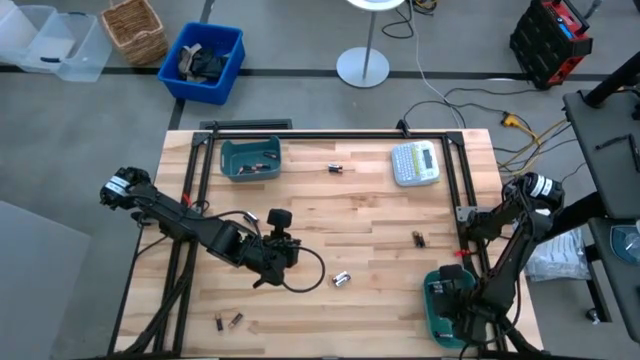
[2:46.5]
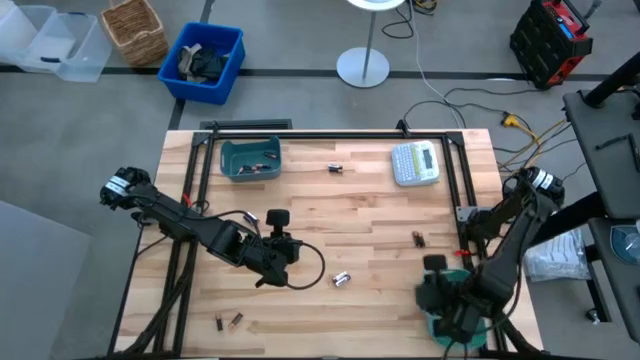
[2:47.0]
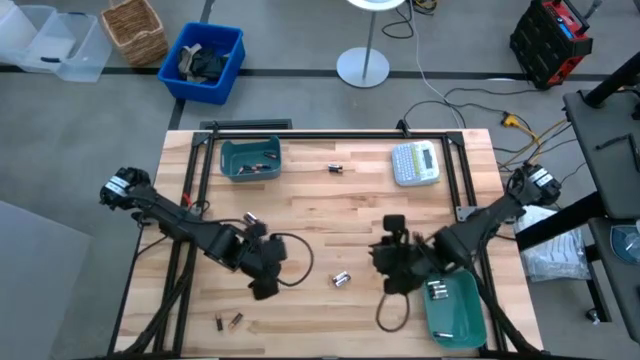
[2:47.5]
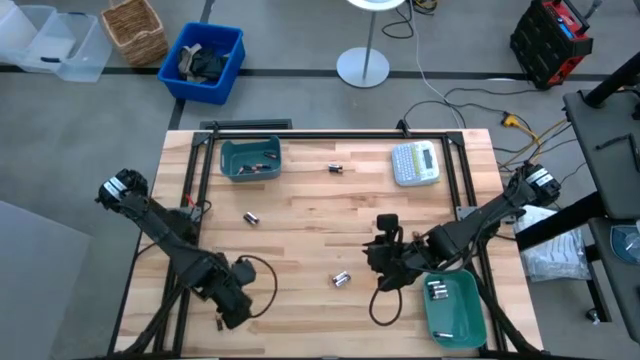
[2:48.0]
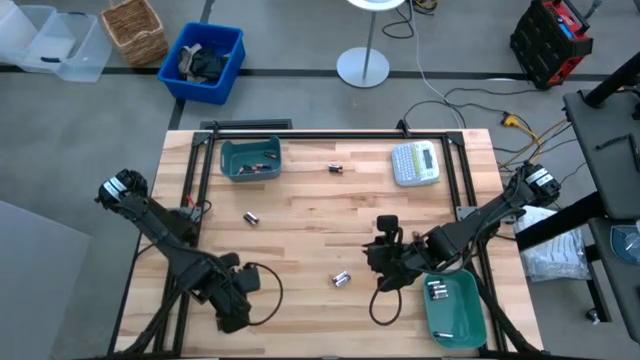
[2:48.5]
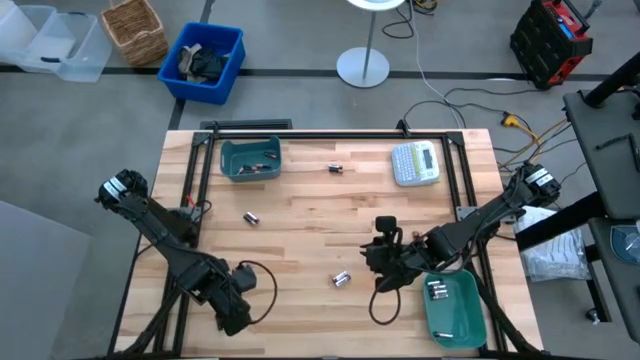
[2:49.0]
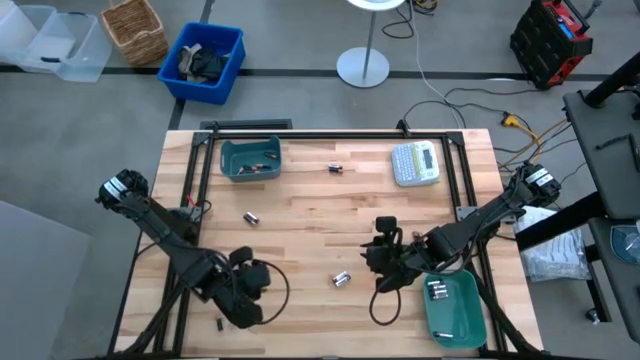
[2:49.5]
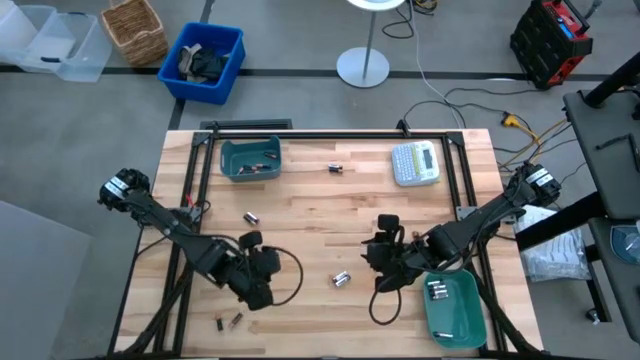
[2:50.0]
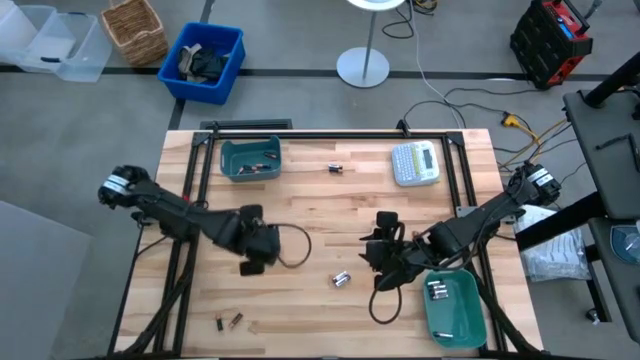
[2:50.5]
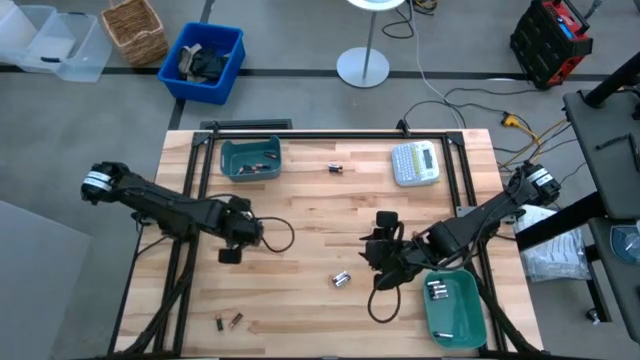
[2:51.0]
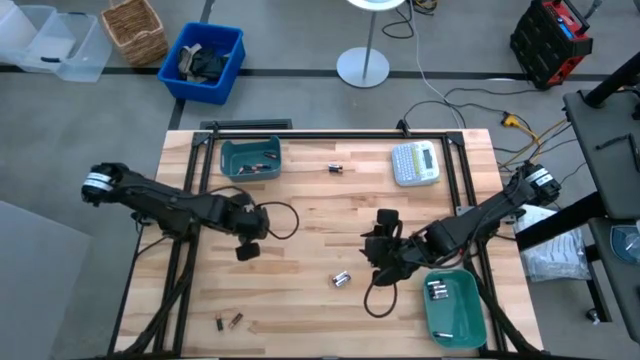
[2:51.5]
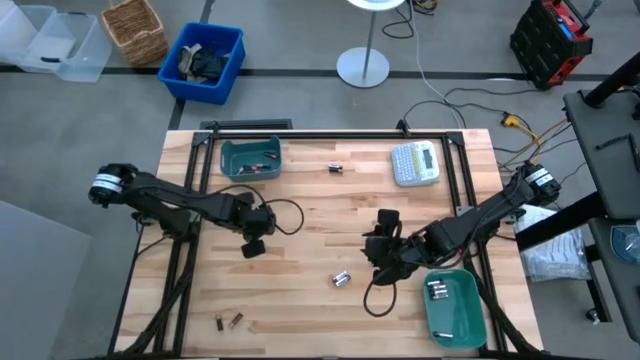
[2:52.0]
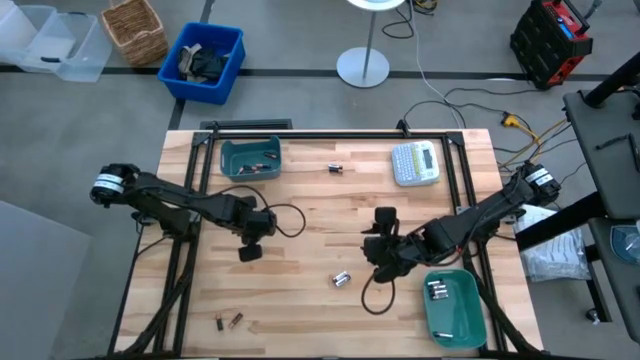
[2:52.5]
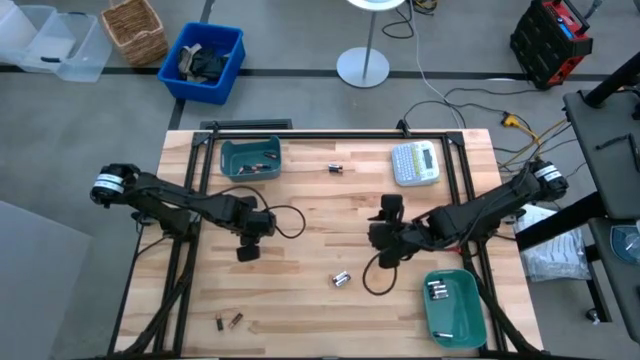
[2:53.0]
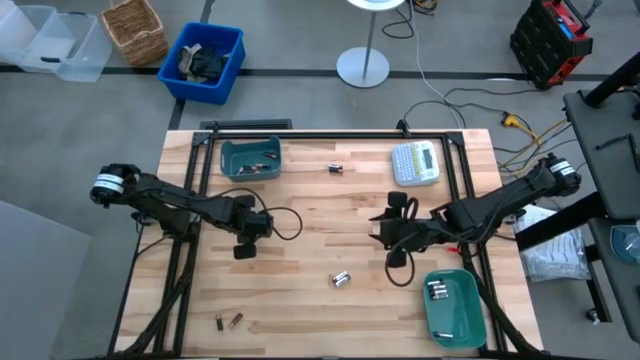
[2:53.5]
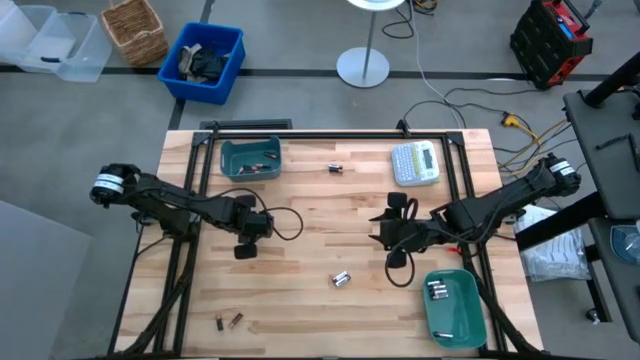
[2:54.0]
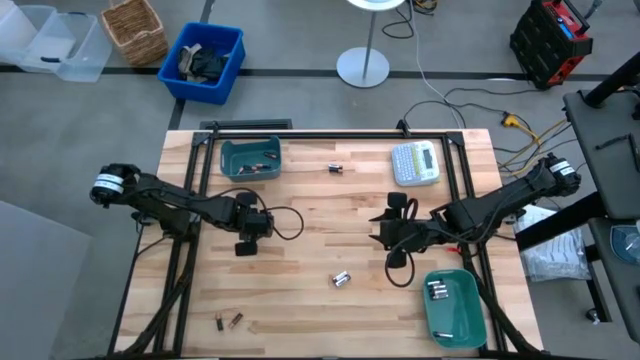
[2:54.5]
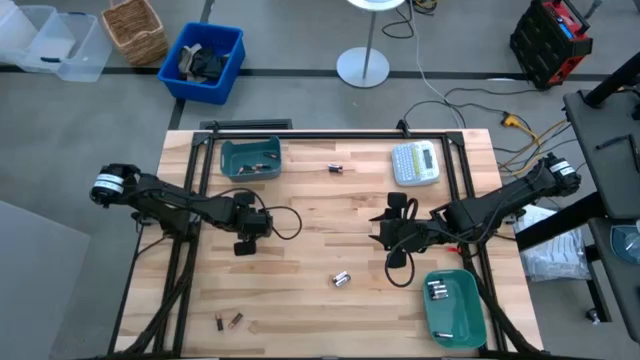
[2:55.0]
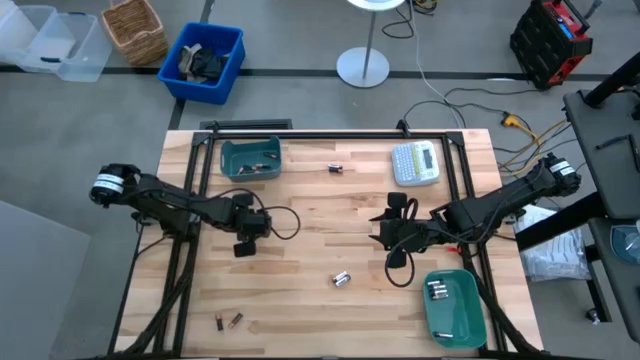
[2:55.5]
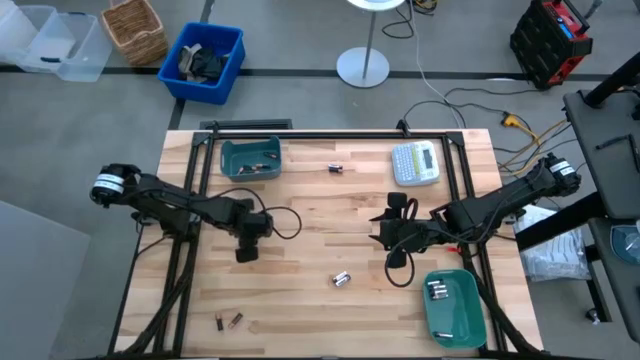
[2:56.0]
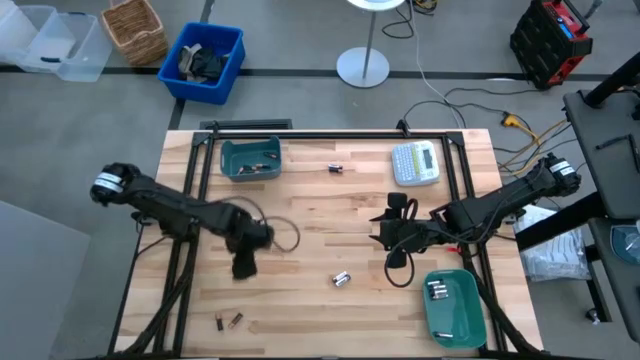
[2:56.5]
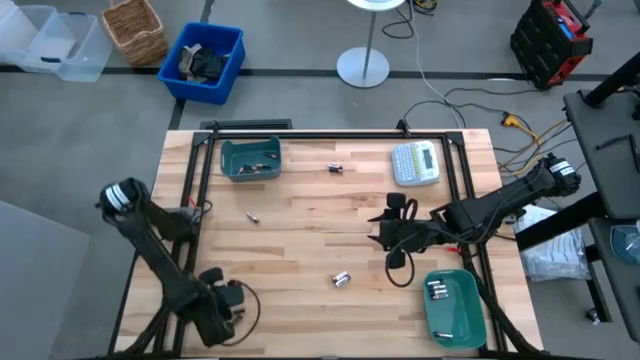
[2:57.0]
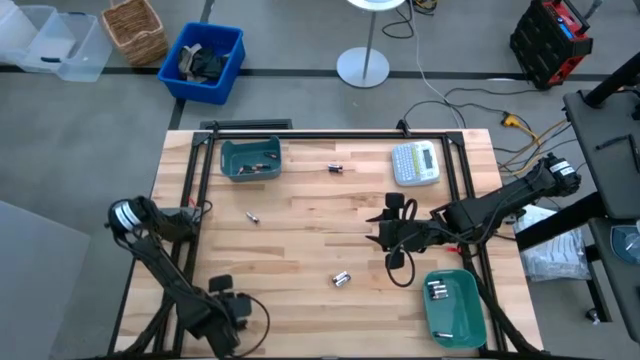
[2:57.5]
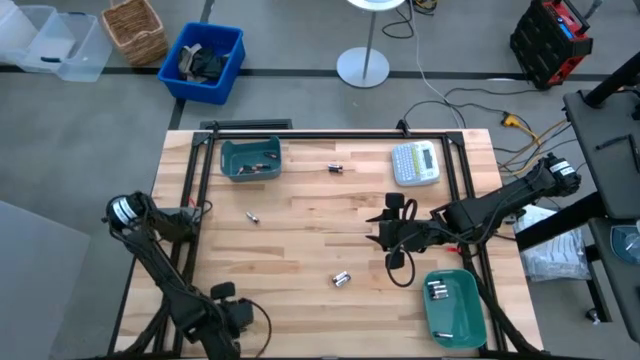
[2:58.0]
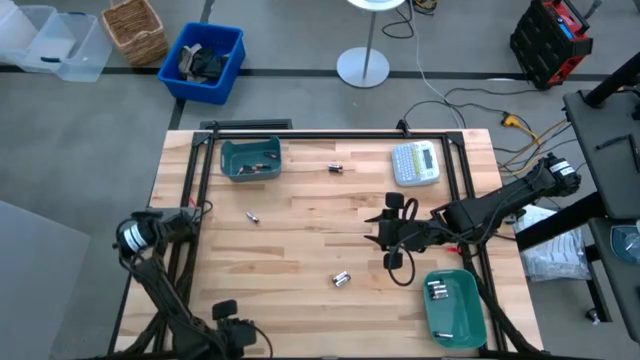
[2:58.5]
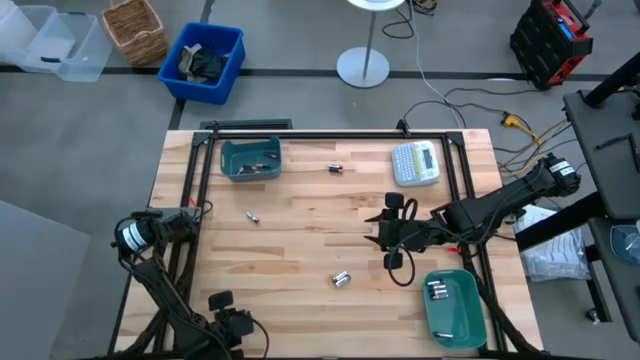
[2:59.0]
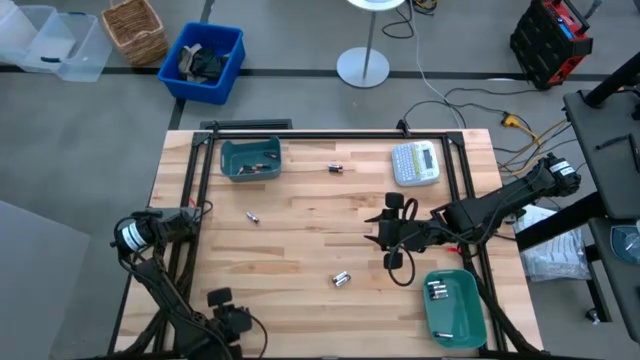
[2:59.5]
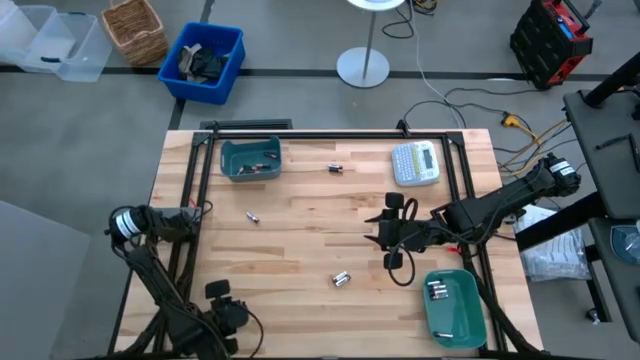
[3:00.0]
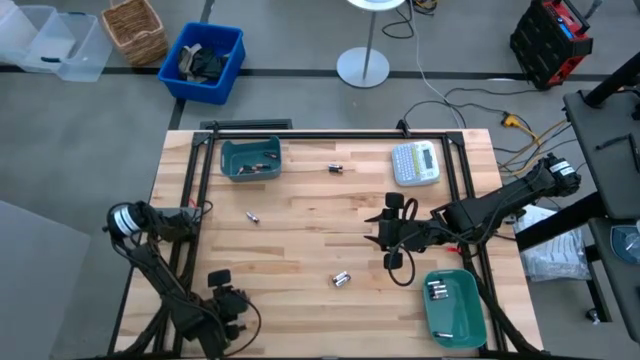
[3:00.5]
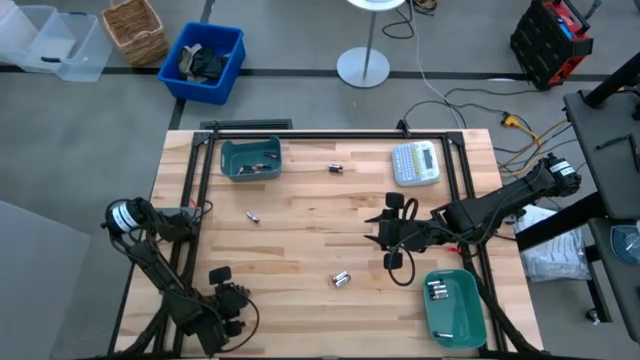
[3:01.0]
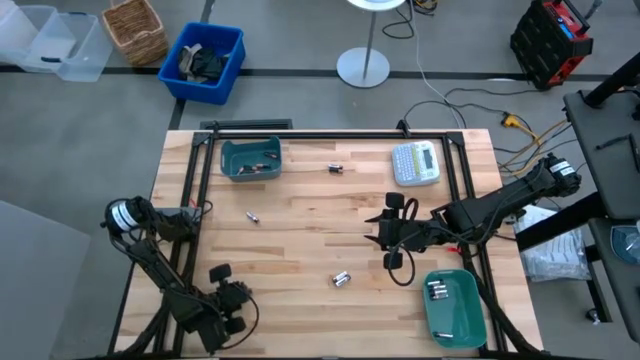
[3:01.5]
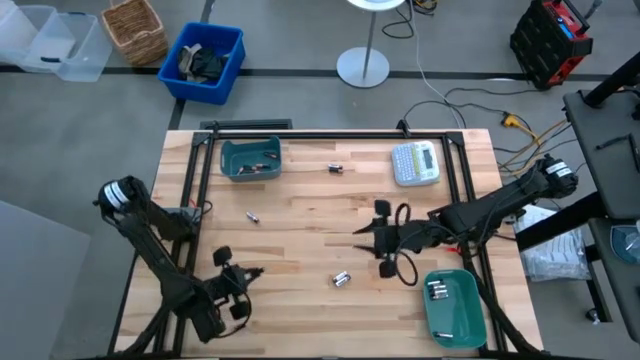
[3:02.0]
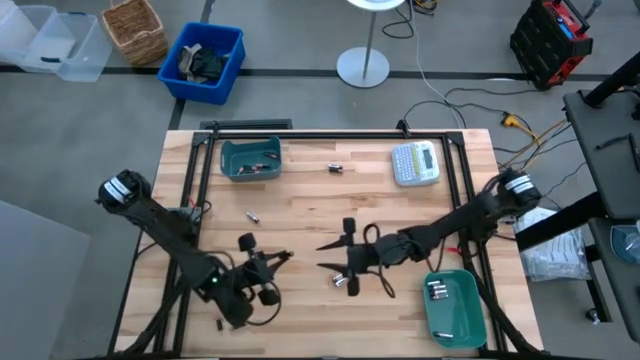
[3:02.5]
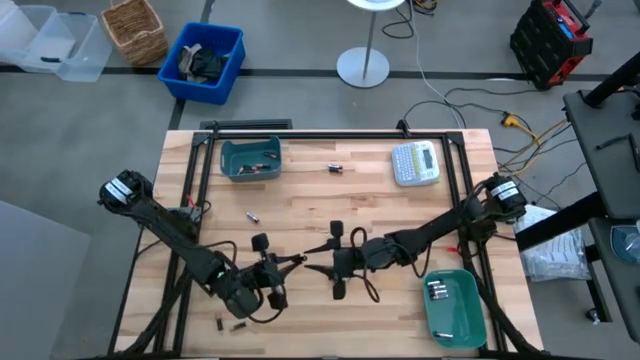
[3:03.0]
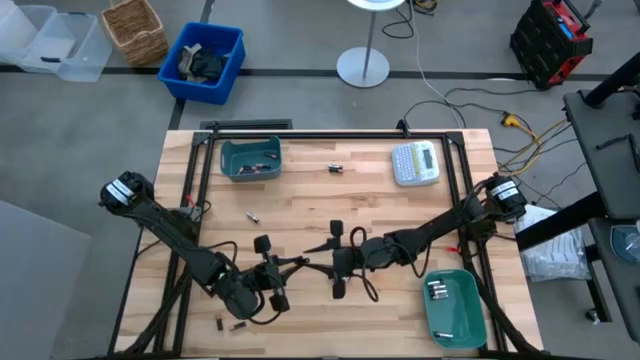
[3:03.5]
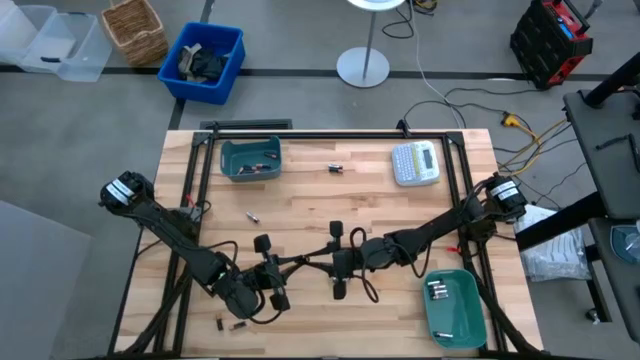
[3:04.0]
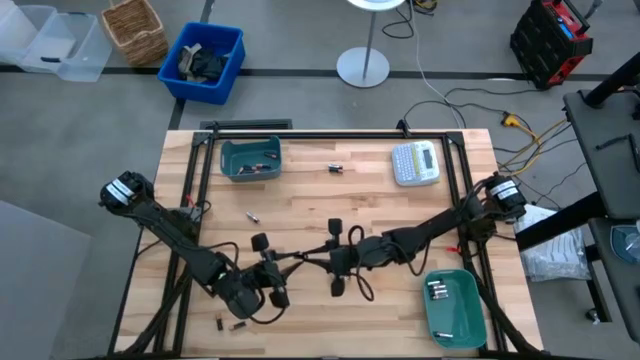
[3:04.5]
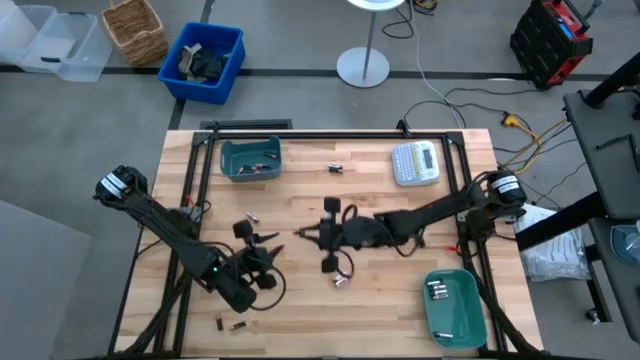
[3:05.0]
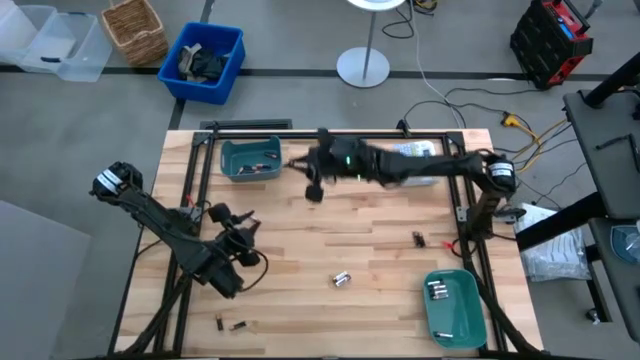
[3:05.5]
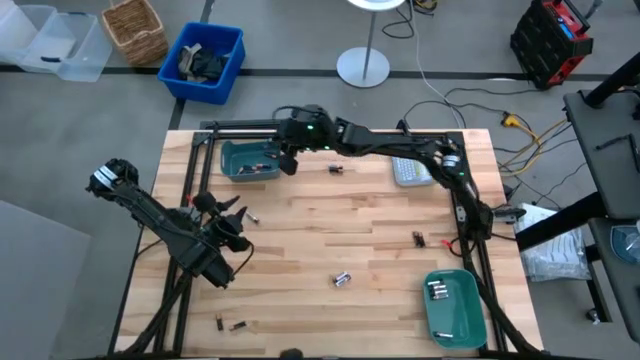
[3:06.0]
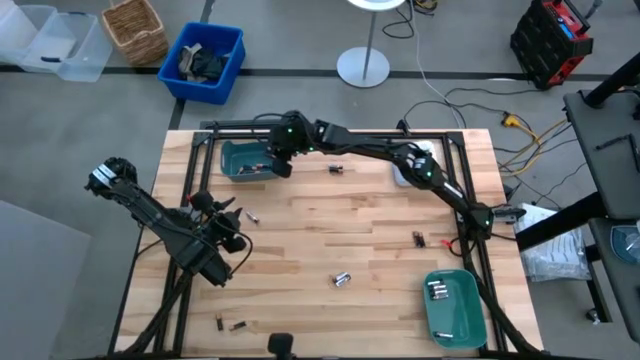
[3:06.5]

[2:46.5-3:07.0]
Task: Sort batteries
Put the black battery into the blue bin

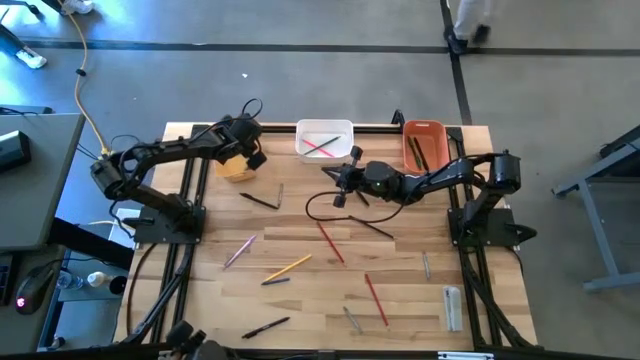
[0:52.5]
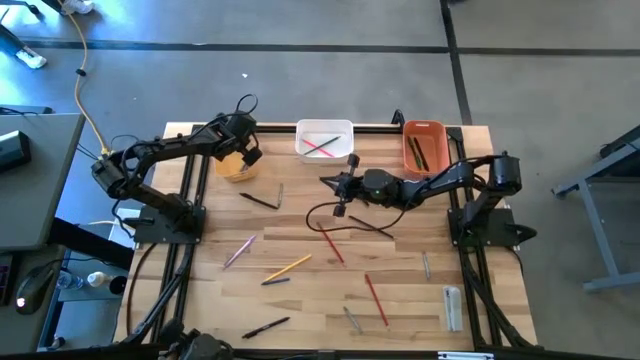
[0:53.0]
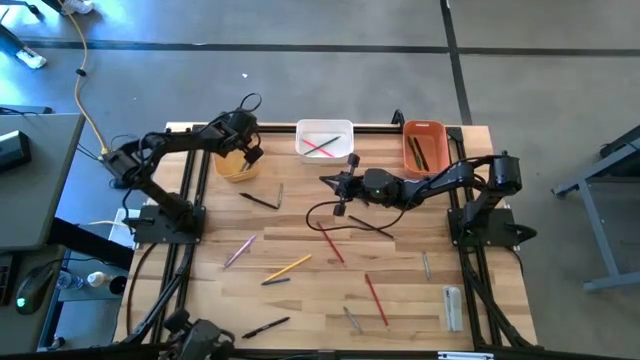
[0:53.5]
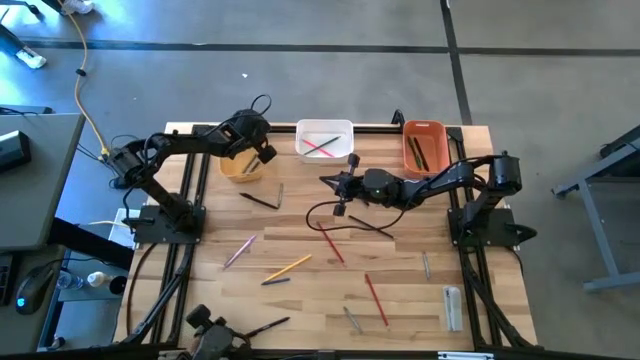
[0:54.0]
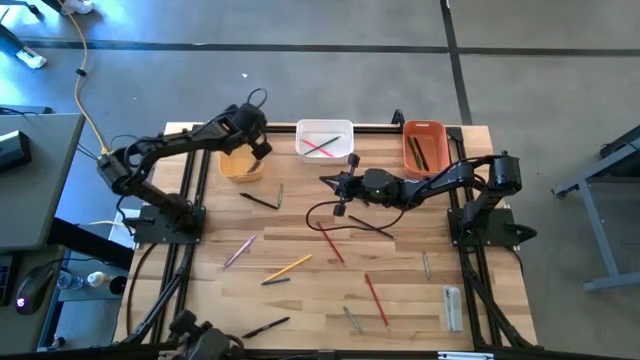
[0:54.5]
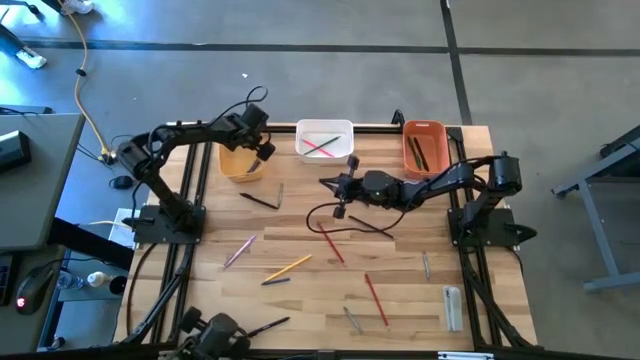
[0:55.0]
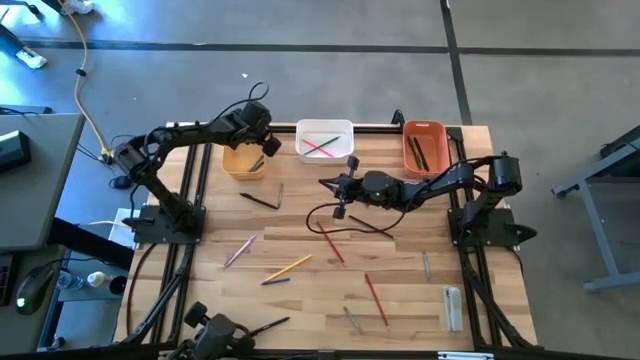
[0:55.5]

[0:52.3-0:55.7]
Task: Sort crayons/erasers/pens/pencils in bins
Adjust the yellow bin
